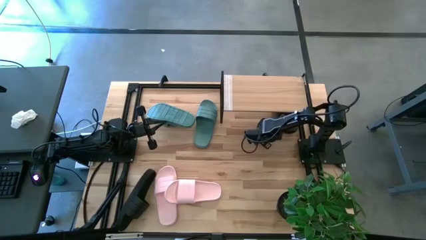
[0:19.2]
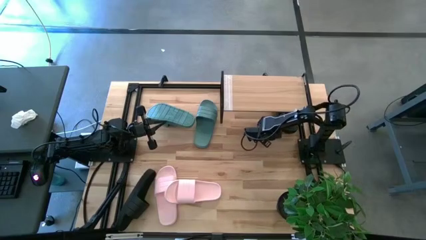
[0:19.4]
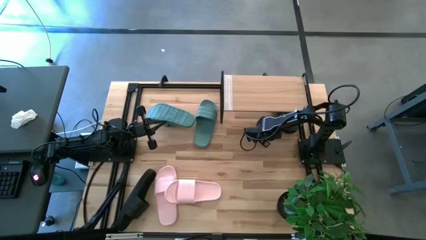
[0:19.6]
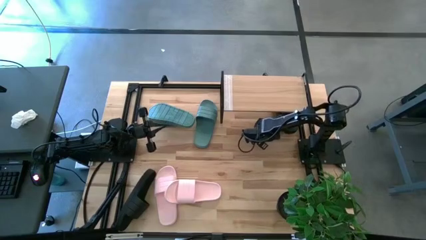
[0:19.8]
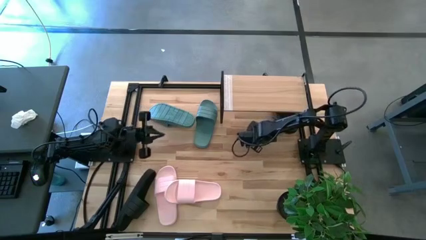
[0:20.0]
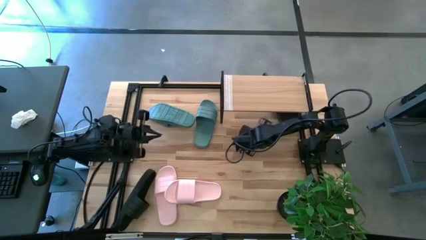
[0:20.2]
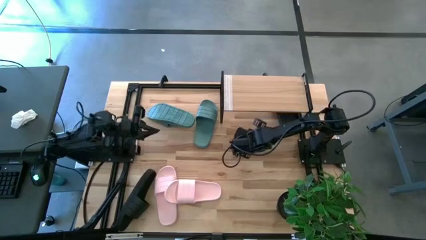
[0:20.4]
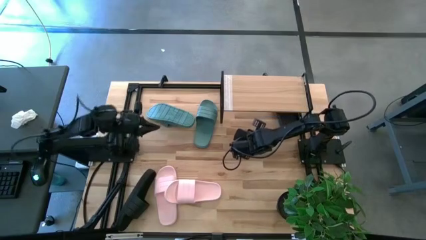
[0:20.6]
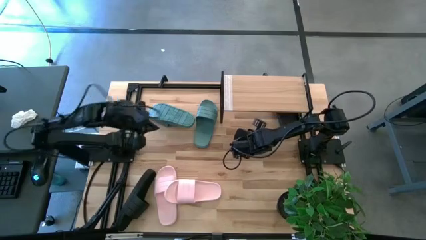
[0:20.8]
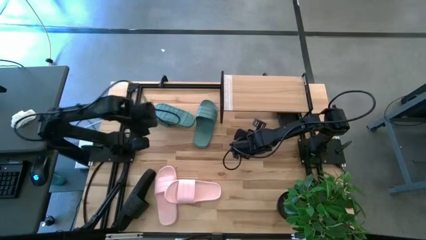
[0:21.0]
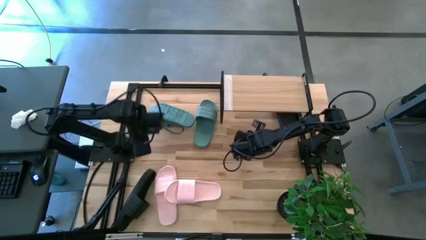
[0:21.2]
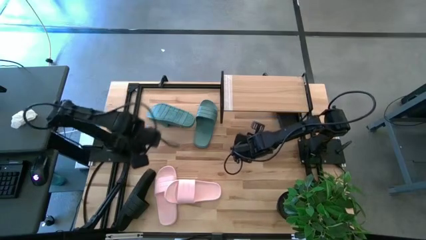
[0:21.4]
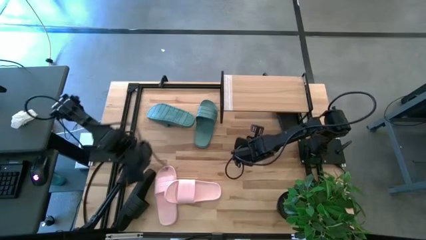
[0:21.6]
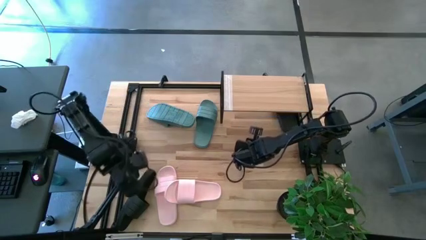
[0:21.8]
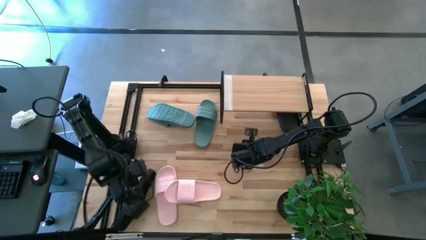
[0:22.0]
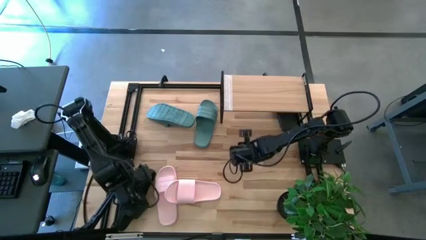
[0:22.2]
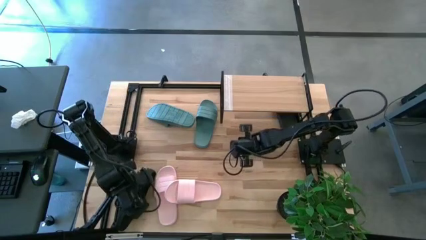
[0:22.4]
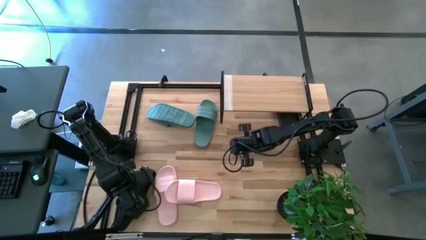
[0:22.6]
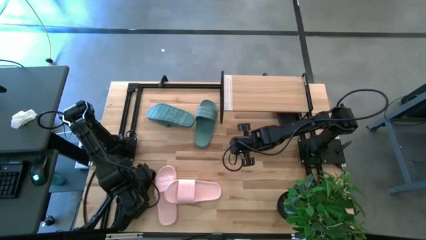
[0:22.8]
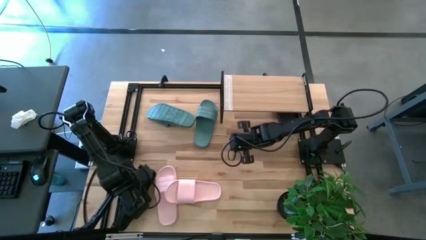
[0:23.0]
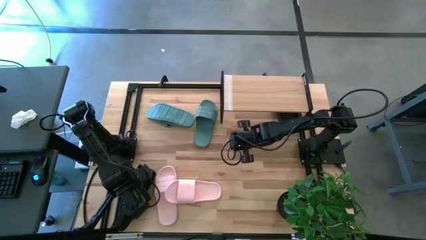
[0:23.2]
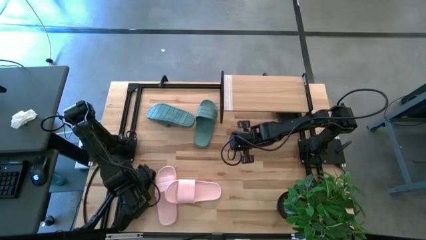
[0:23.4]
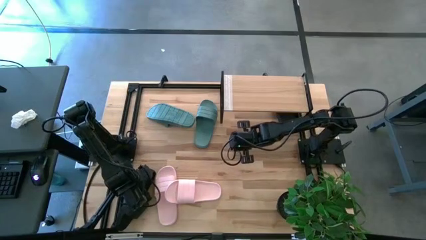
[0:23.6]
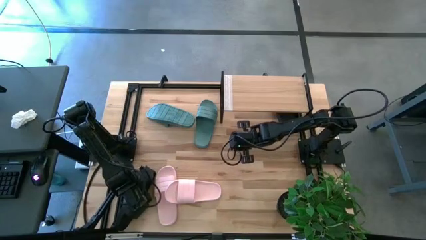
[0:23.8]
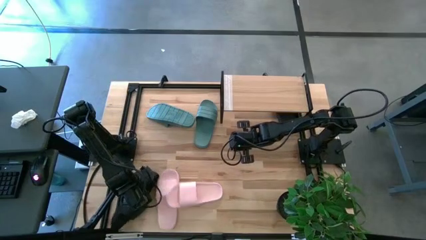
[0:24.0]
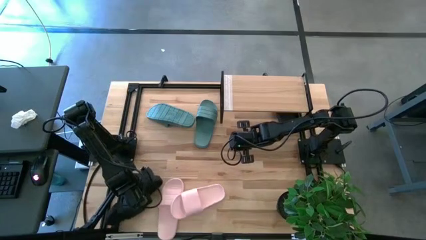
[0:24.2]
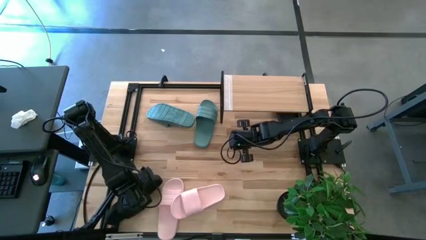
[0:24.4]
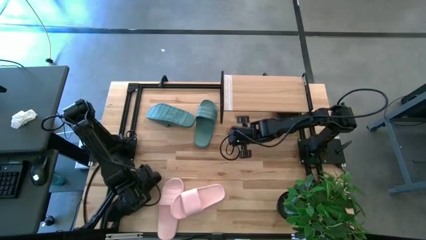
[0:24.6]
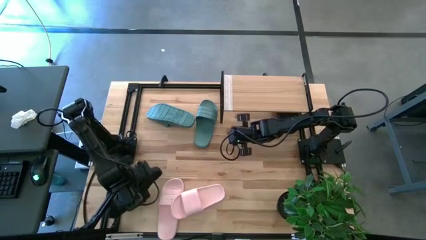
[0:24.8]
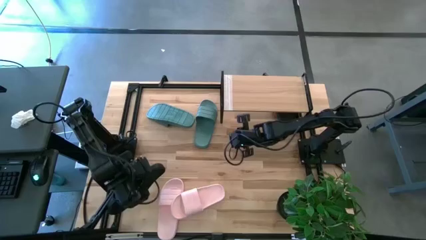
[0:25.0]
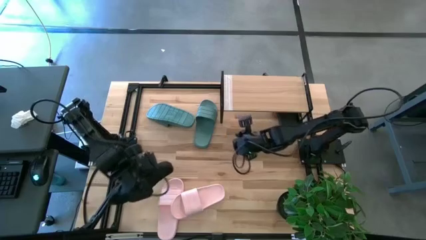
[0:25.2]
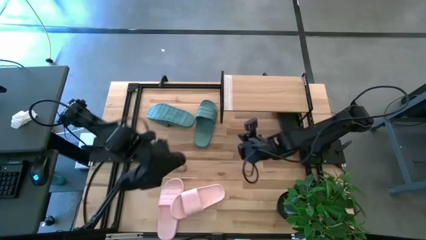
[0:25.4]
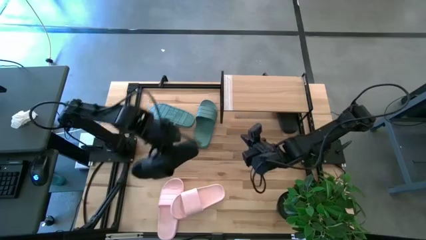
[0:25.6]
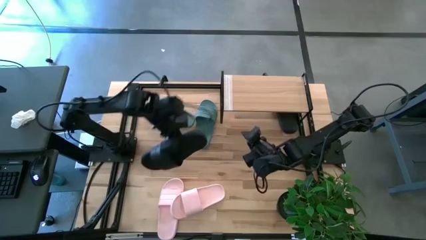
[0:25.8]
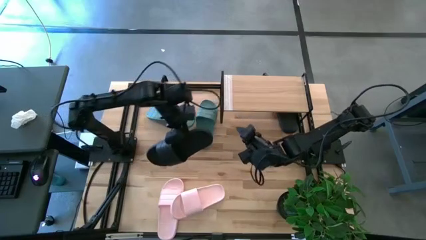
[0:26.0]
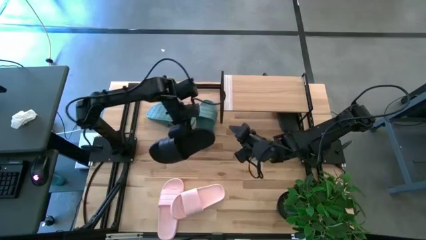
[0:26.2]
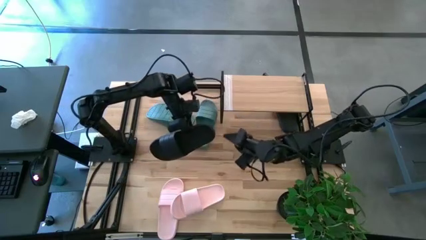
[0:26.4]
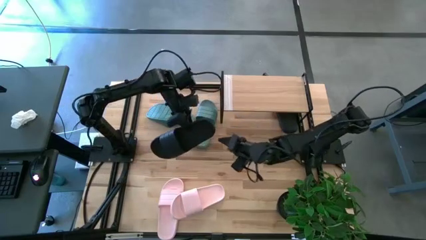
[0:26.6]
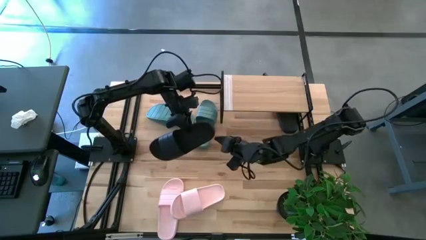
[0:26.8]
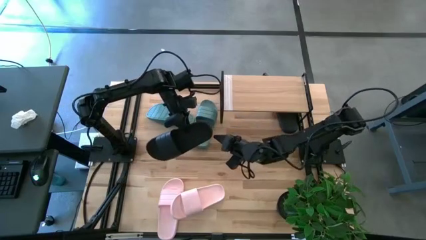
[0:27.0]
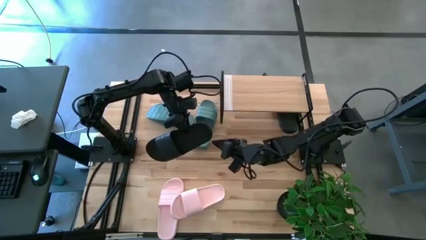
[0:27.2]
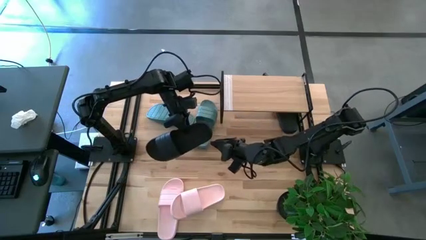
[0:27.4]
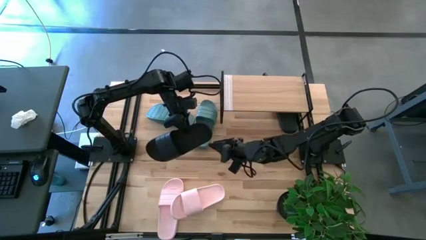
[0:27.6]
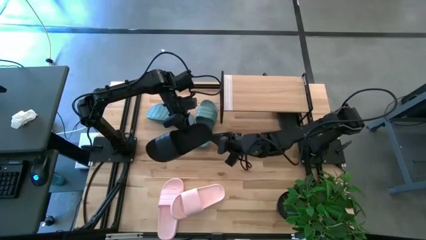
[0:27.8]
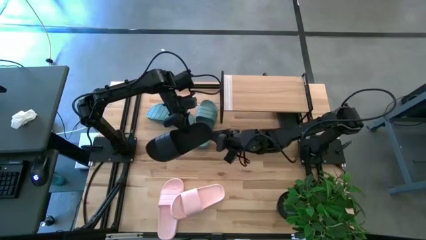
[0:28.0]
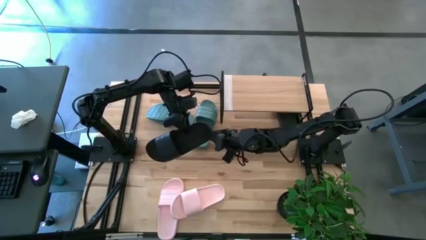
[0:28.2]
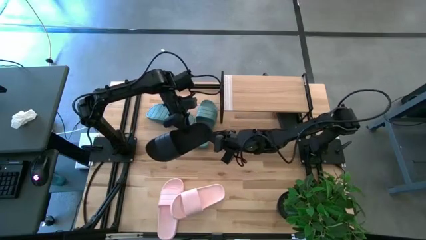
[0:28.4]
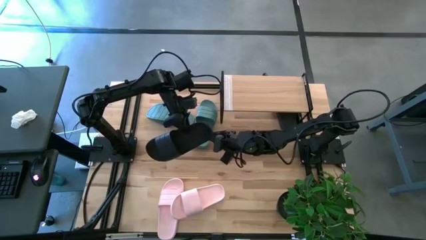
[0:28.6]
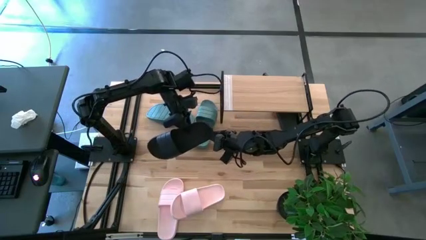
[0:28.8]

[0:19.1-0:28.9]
Task: Pick and place slides into the shelf
Put the black slipper under the shelf

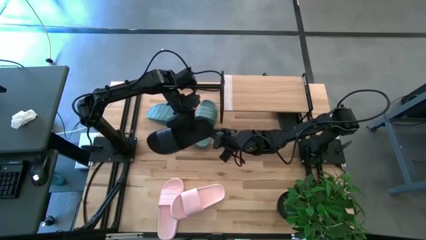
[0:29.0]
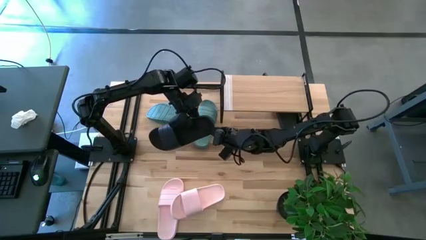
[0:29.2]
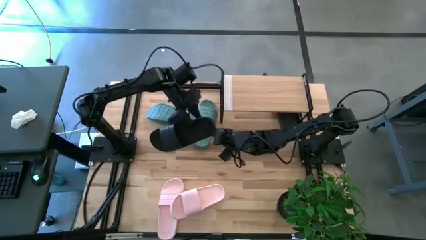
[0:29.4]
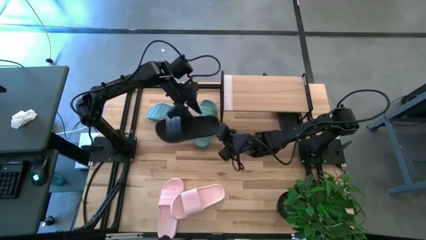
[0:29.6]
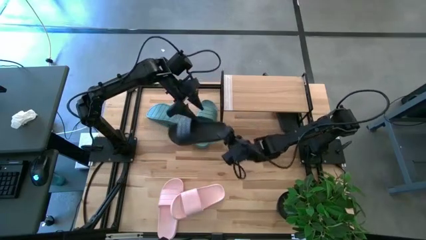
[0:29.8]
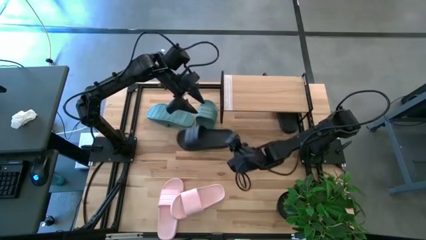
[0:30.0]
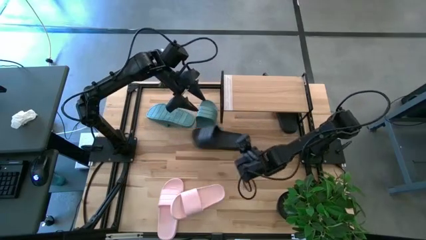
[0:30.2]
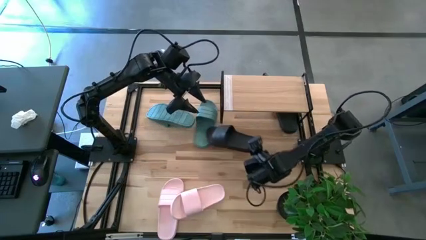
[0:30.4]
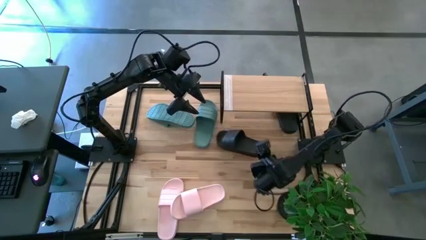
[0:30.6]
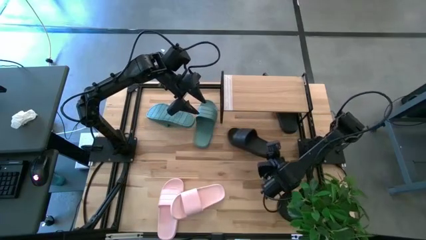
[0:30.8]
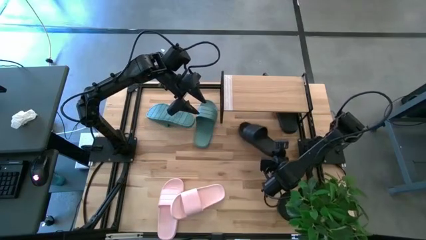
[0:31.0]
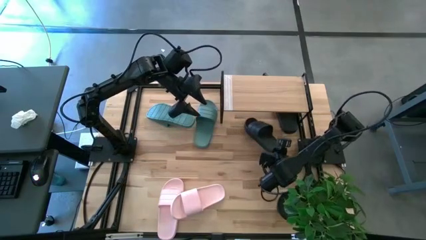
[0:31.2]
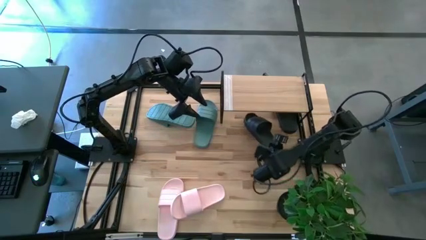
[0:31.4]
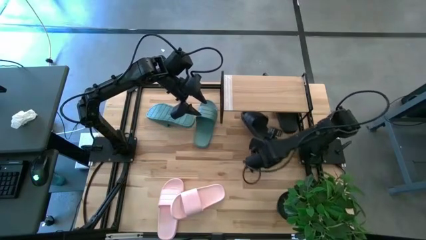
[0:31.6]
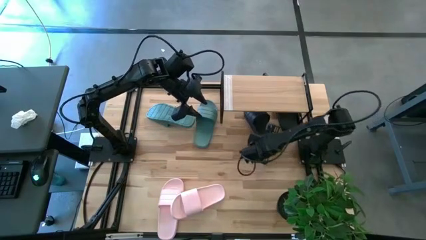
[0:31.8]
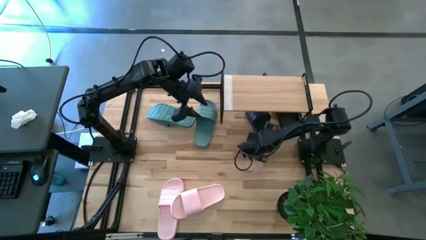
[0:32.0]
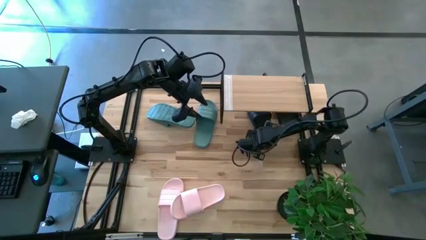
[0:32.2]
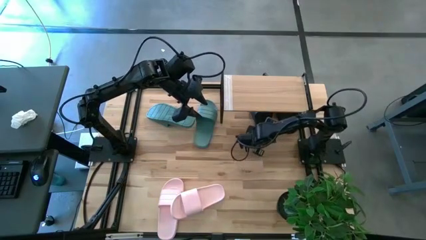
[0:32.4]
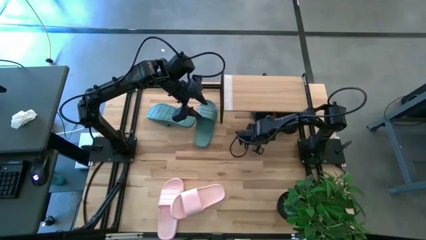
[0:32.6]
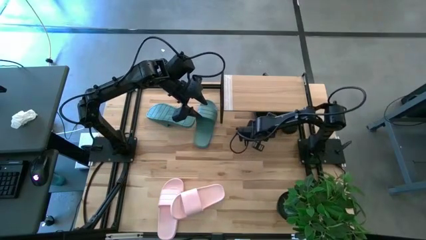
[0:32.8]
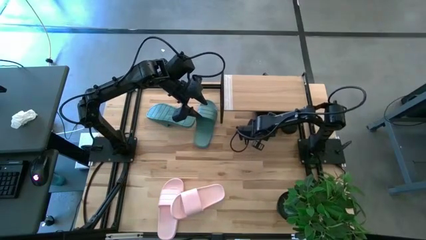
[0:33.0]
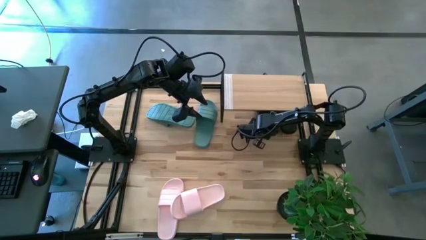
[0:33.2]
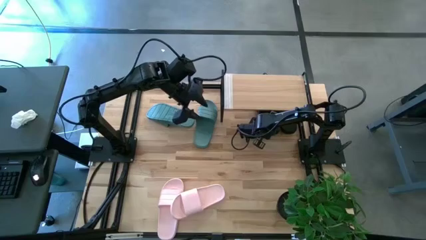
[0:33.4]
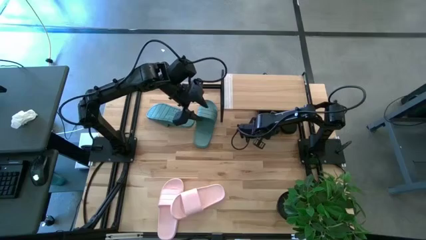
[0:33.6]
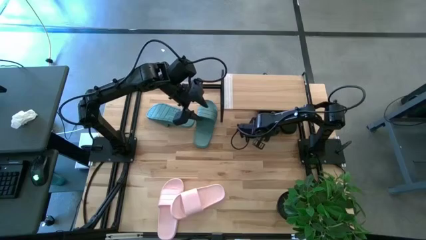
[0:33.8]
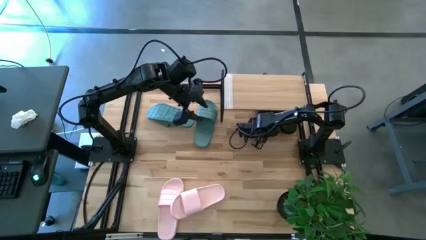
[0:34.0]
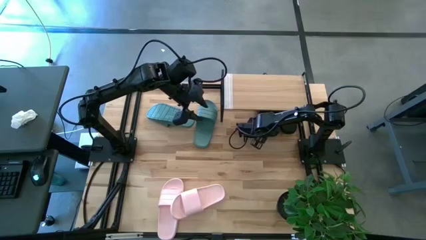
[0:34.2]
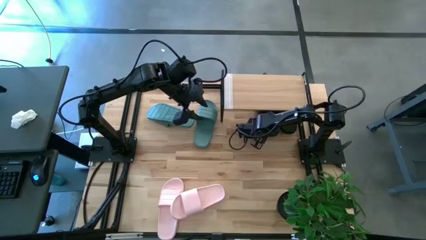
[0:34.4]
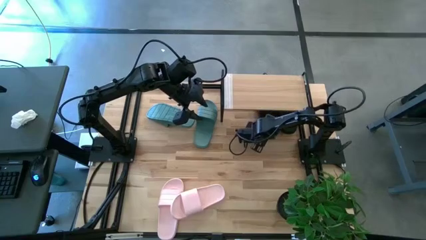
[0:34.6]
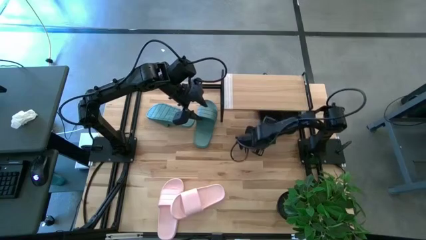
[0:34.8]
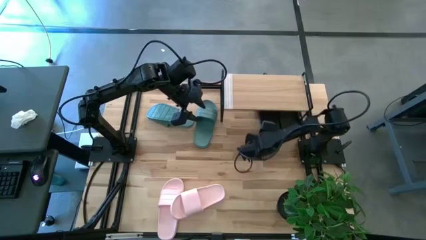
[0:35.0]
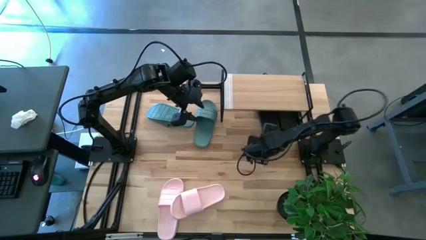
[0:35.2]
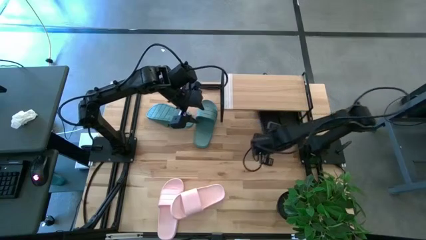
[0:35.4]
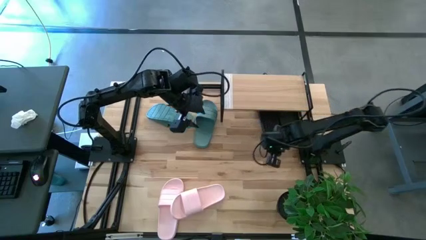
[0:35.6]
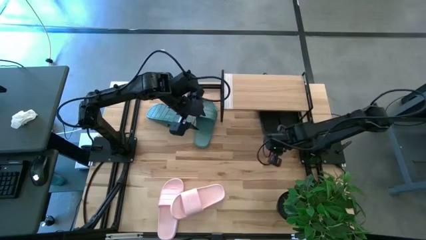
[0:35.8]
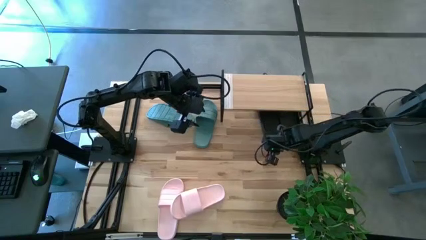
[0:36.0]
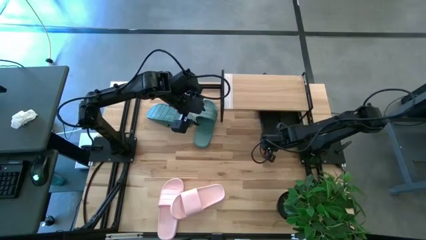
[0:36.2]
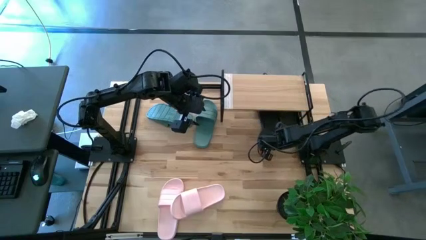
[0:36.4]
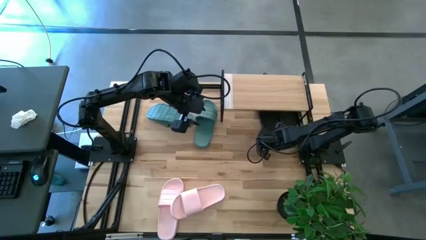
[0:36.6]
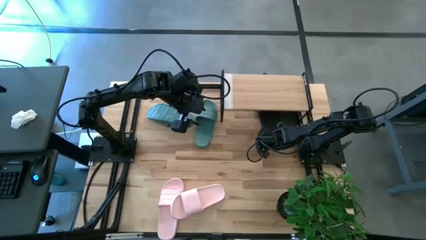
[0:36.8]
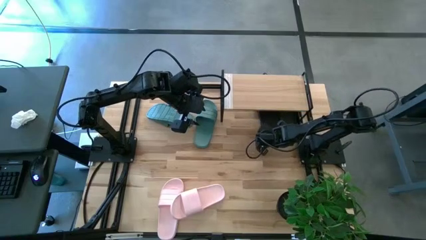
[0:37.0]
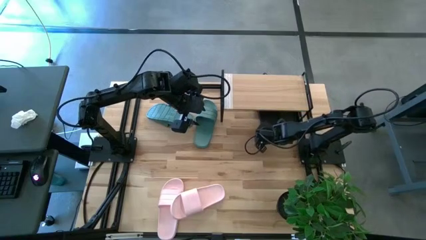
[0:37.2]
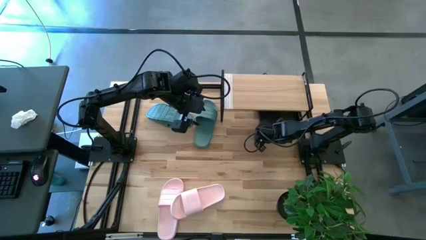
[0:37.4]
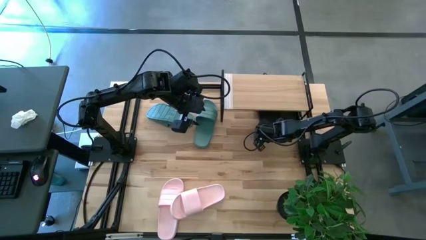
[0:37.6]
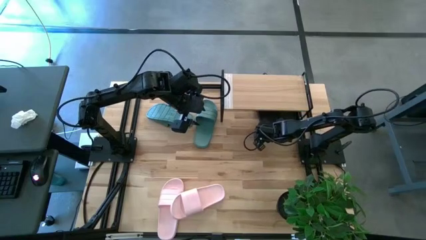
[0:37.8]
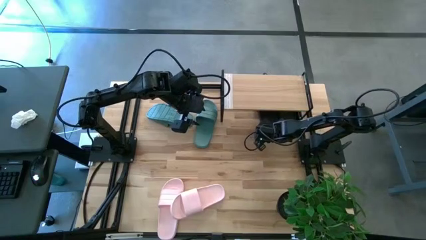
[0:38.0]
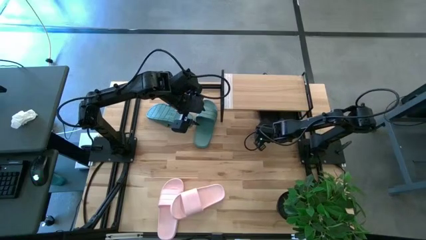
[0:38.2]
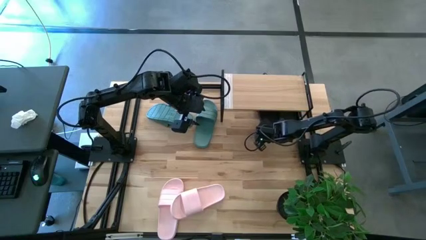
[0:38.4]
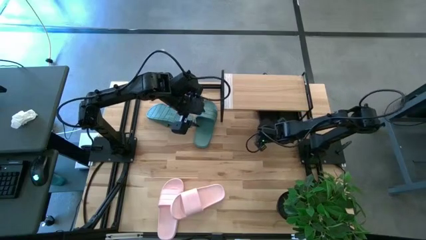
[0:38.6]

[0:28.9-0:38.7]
Put the black slipper under the shelf
